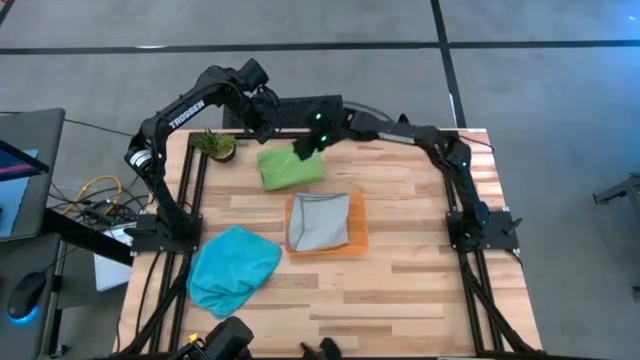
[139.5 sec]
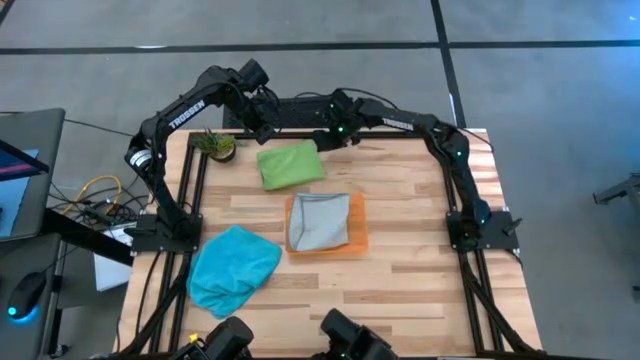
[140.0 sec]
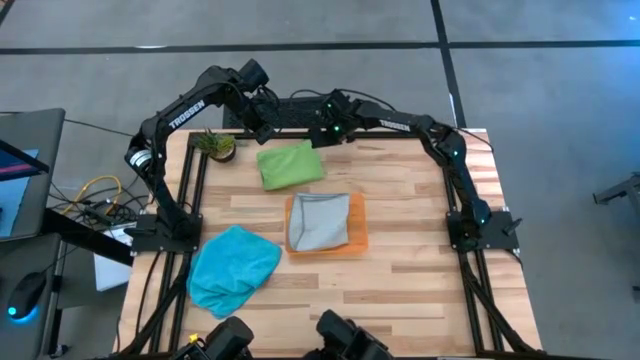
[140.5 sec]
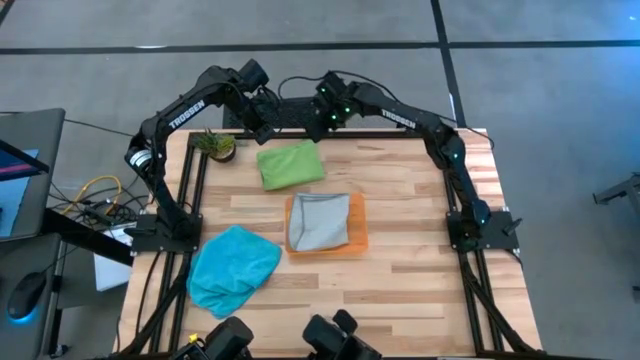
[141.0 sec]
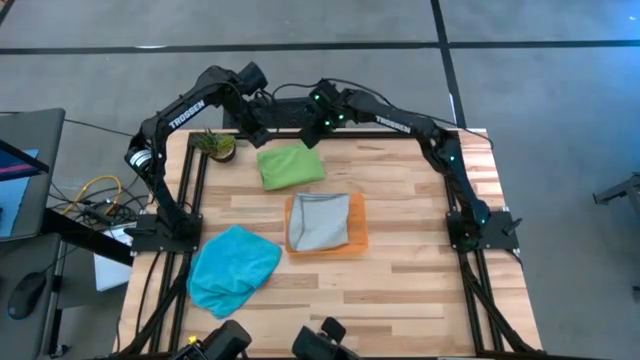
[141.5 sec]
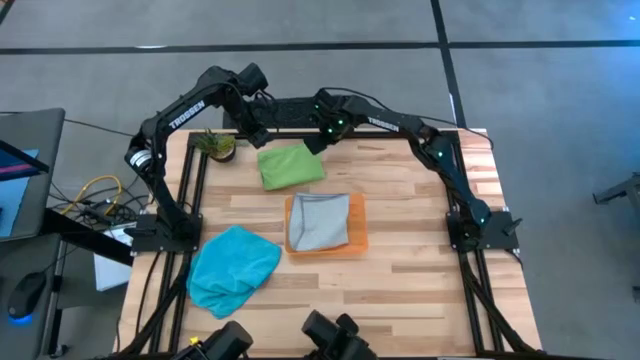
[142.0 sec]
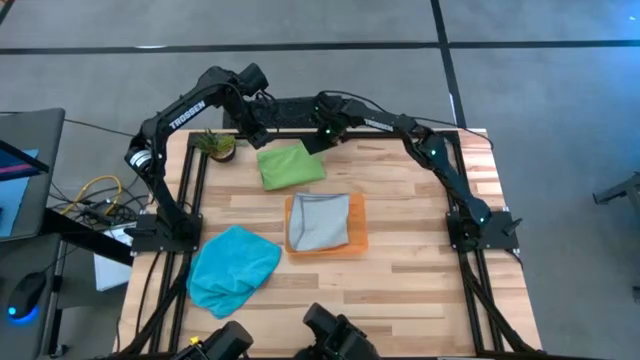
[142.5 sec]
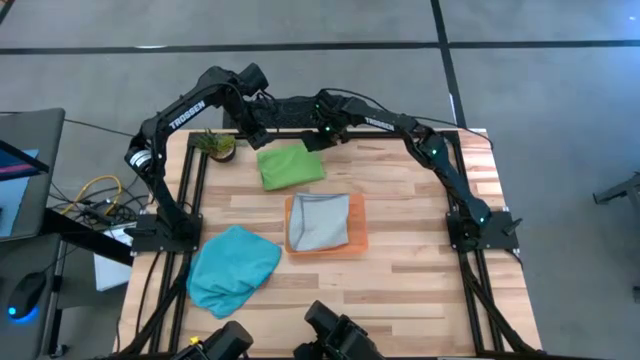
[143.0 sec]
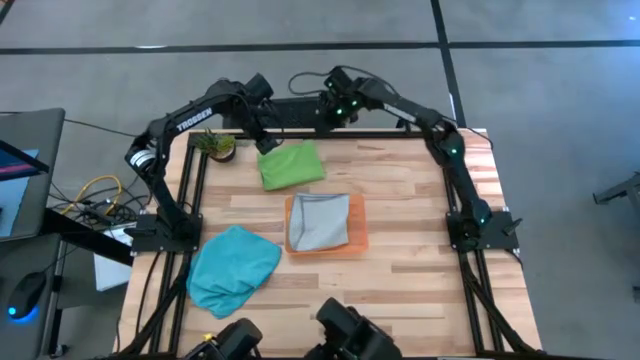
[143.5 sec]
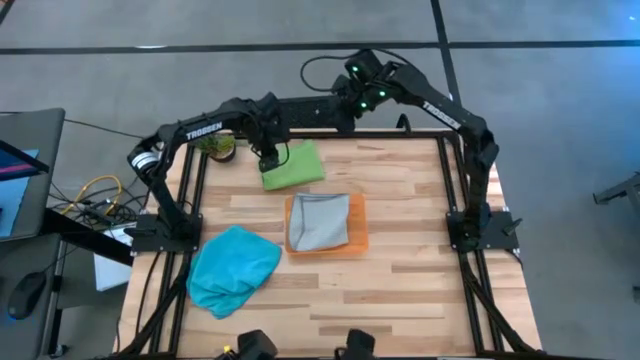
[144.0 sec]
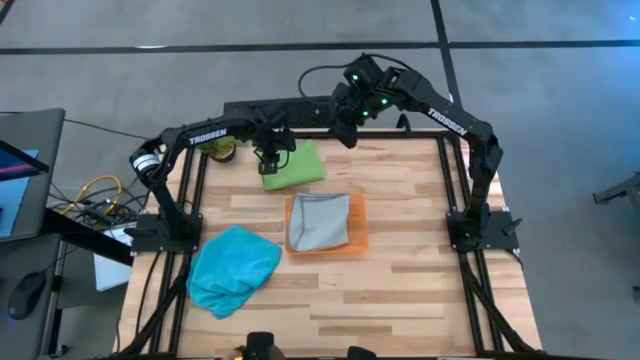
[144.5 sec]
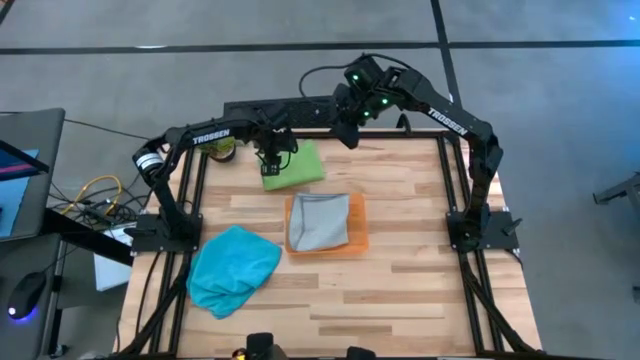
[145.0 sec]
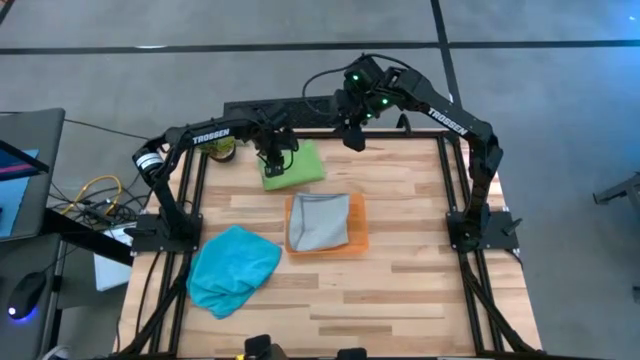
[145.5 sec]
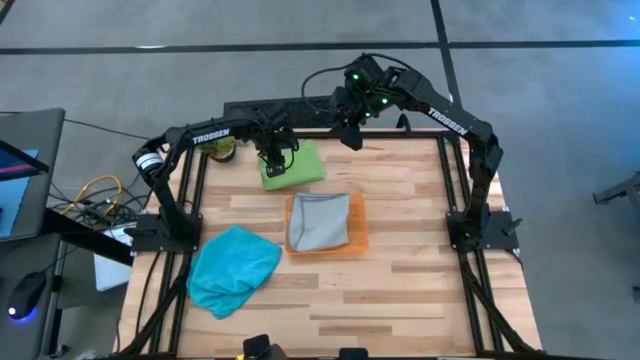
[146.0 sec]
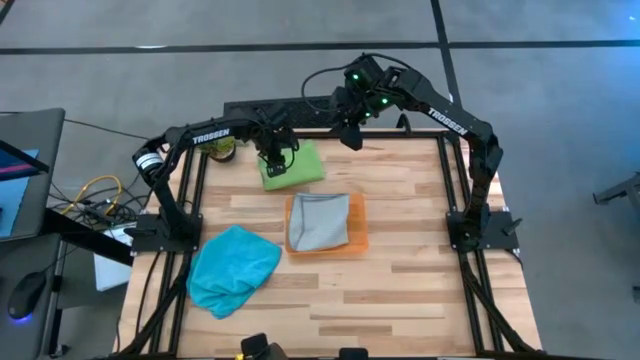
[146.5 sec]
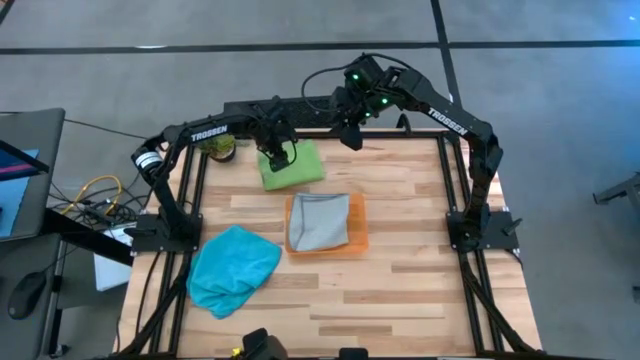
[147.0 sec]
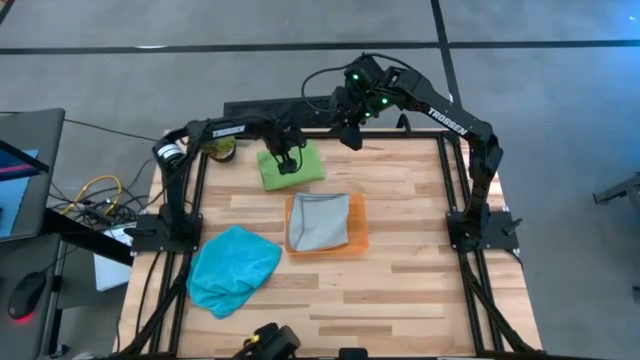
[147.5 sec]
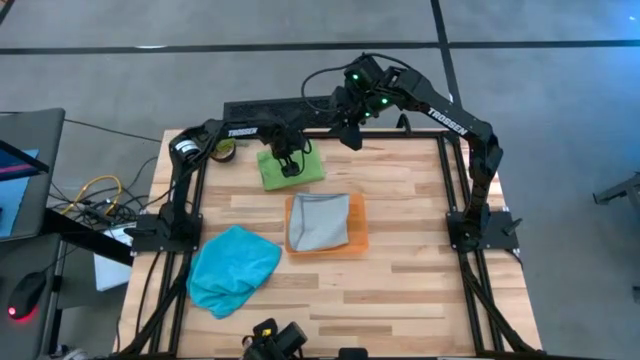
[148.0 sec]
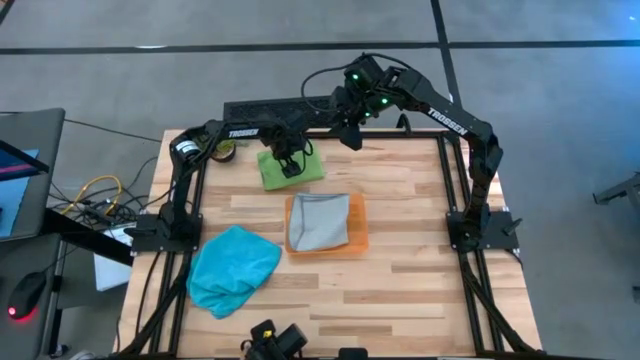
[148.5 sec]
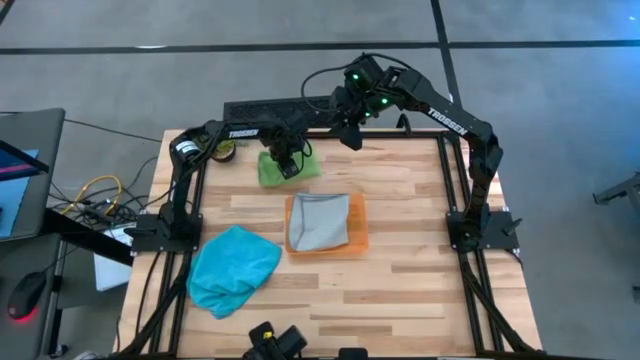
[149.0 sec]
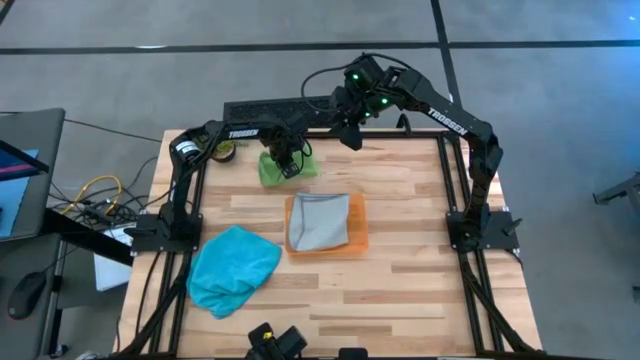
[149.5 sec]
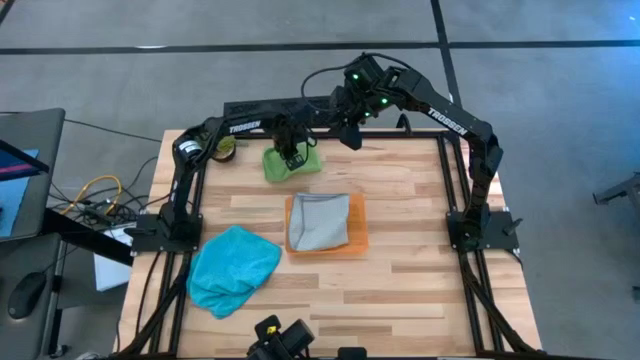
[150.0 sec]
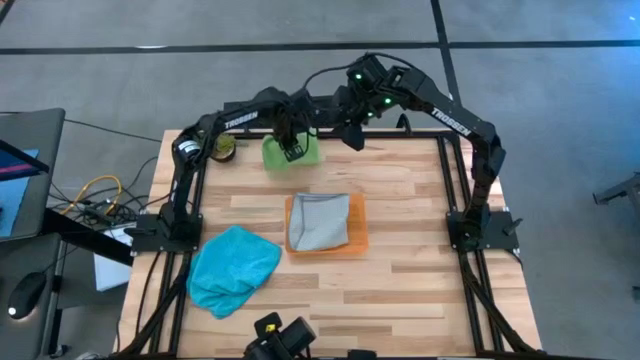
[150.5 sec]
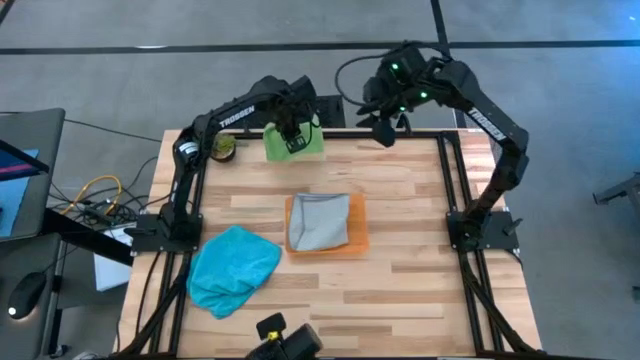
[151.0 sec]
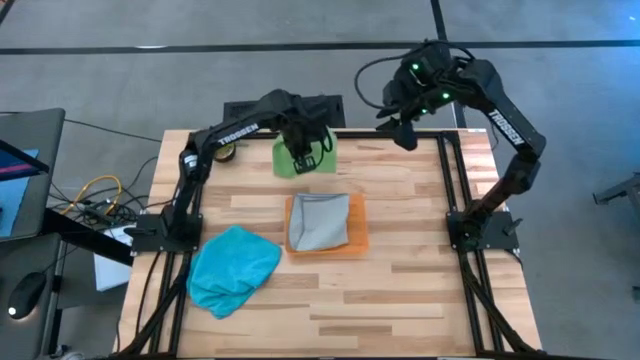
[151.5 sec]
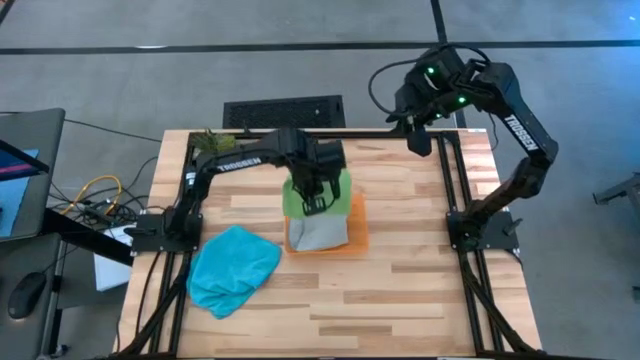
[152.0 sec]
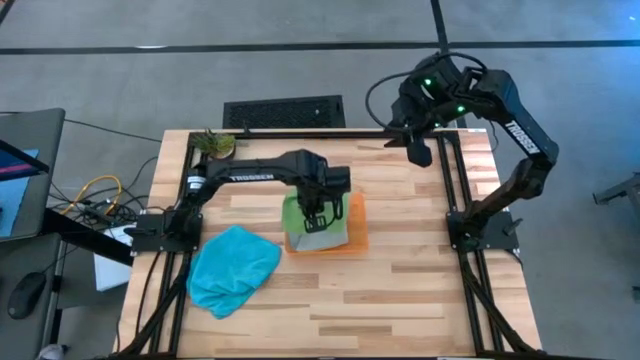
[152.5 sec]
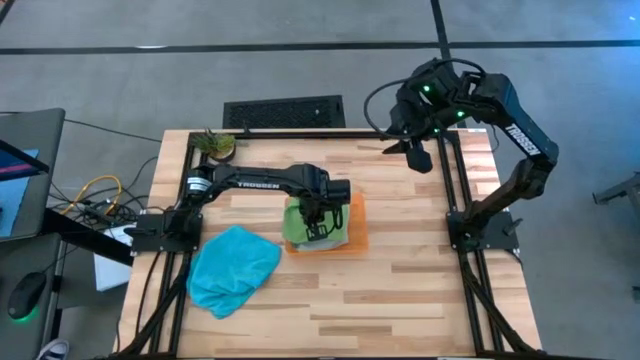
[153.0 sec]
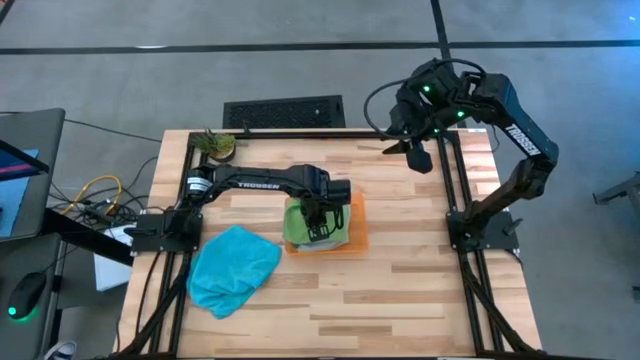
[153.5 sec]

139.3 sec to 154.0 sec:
Task: Sort microfiber towel by color & place in baskets
Stack the green towel on top of the gray towel into the orange bin

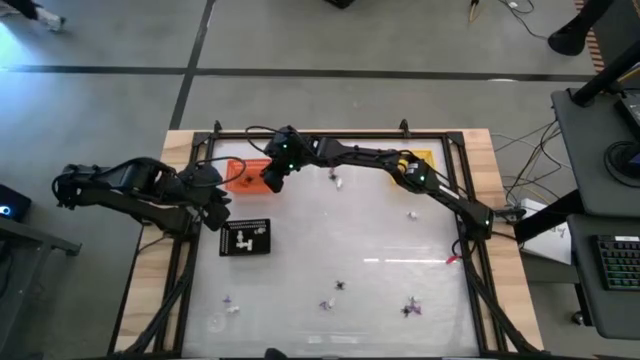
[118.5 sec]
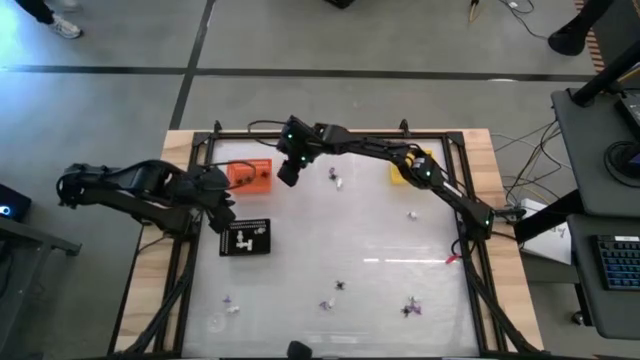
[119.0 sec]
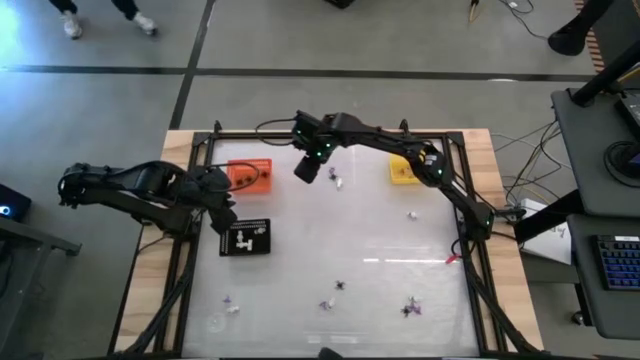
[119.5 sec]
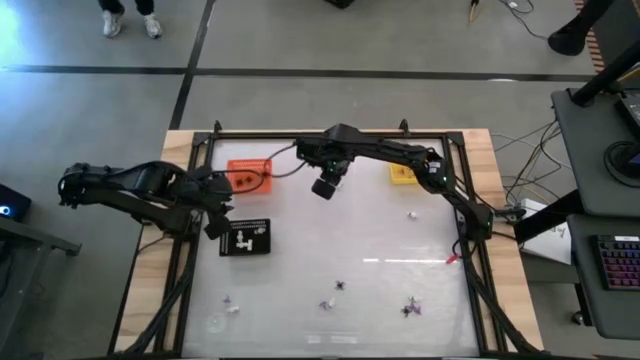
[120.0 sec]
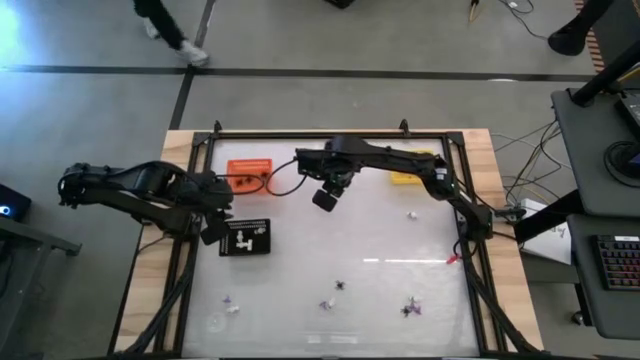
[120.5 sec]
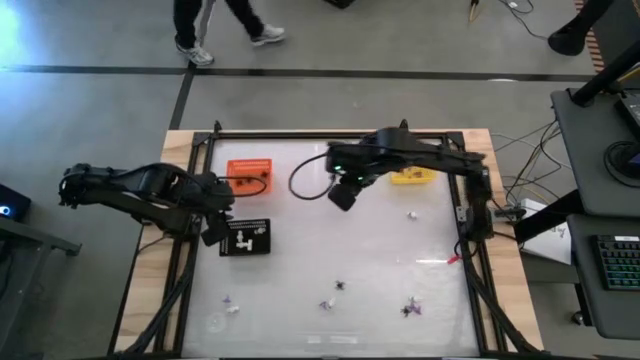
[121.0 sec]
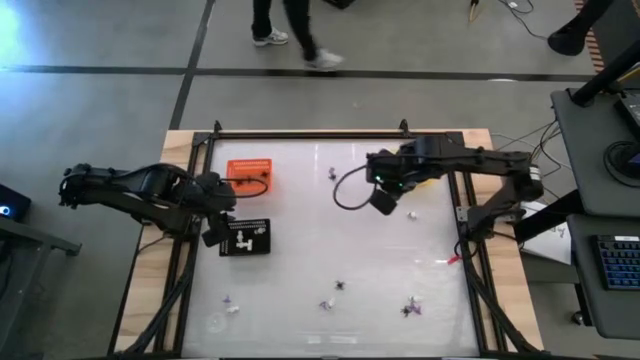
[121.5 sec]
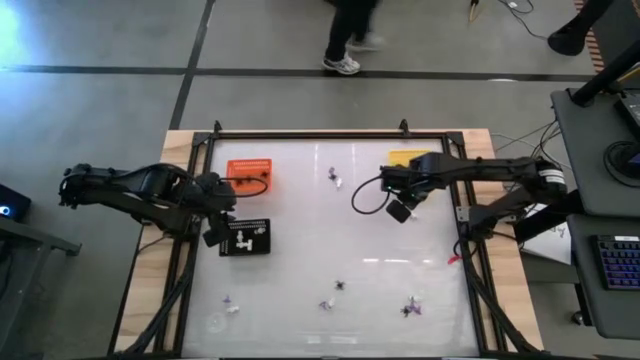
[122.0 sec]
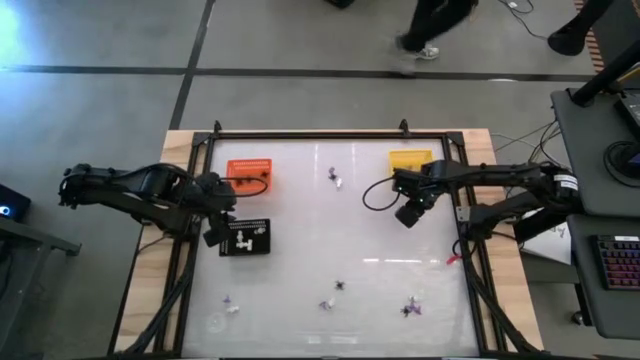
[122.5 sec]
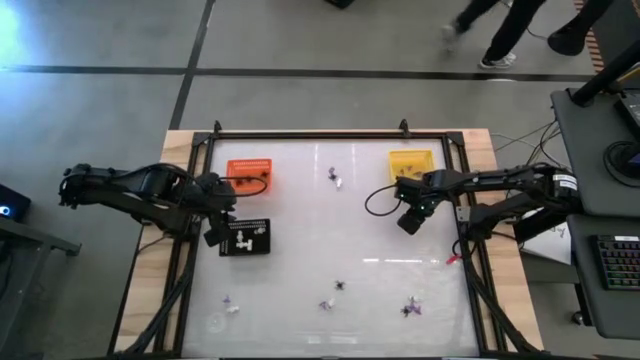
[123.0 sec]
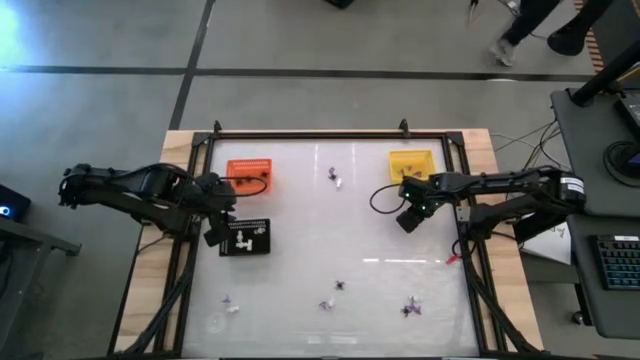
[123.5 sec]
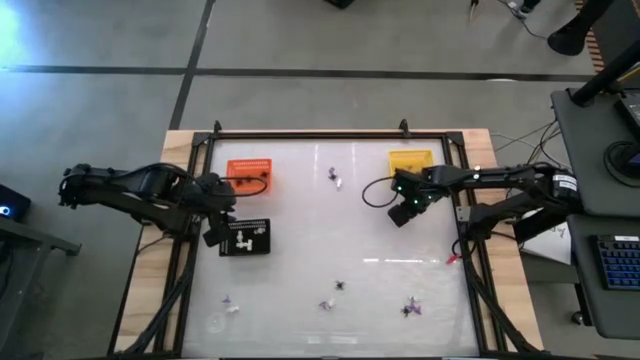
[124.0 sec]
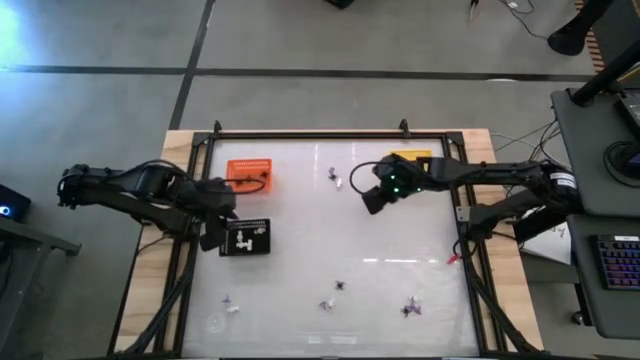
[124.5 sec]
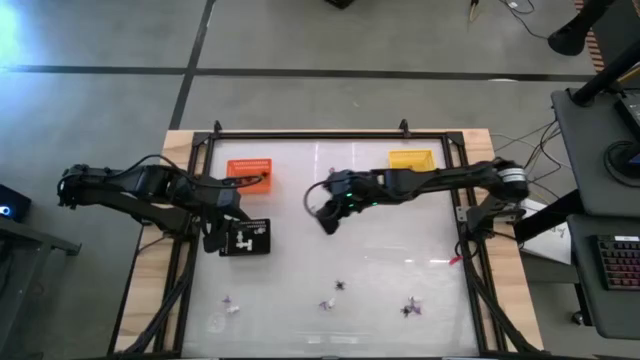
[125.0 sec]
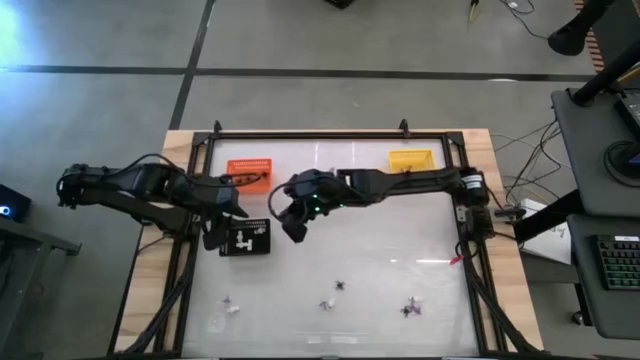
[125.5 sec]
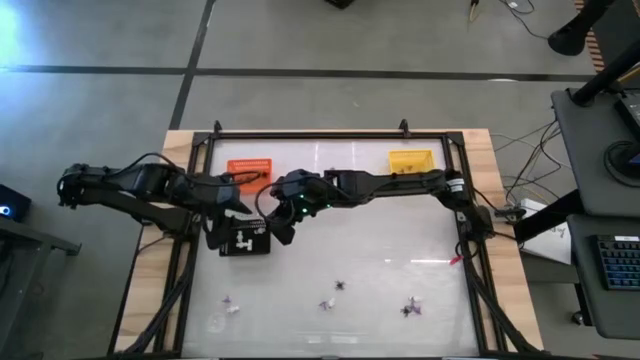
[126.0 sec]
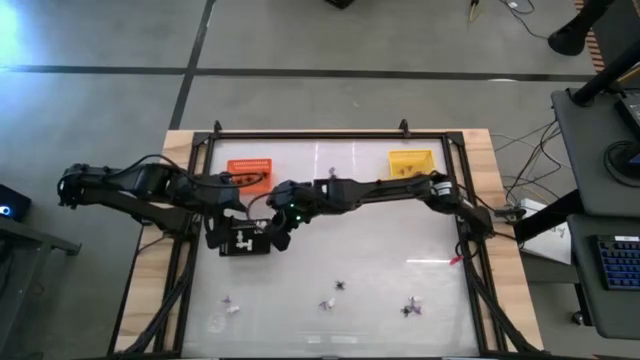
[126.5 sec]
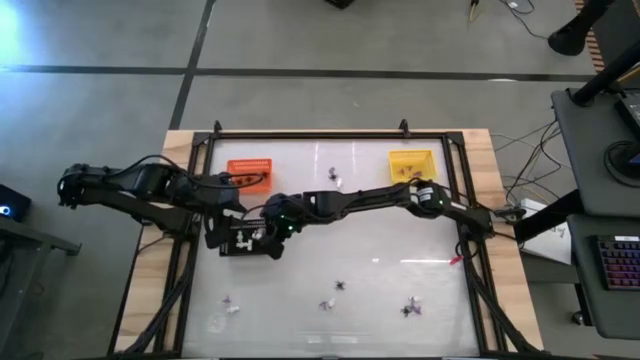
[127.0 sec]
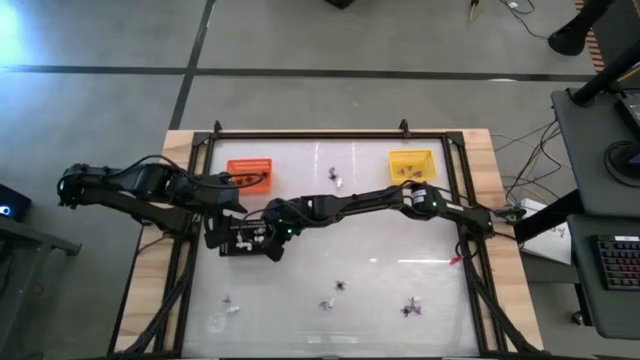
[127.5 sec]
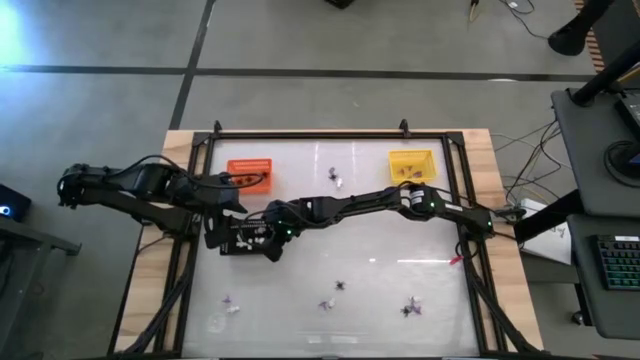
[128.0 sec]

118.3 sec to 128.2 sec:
Task: Sort Halloween decoration
Put the white skeleton toy into the black bin
